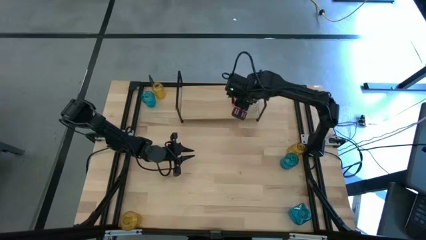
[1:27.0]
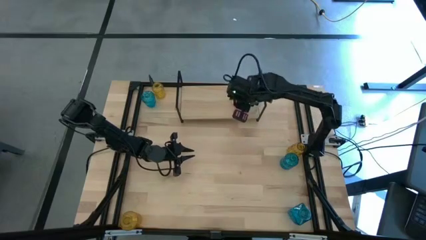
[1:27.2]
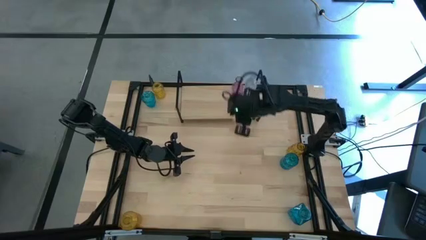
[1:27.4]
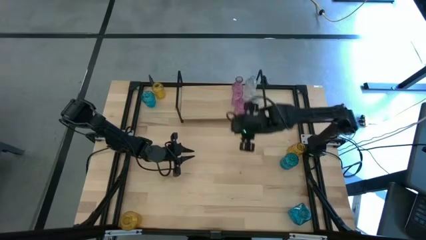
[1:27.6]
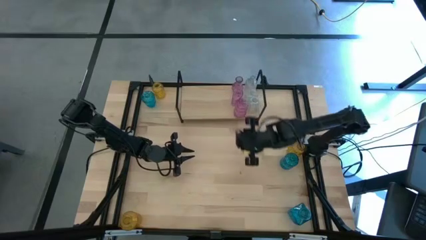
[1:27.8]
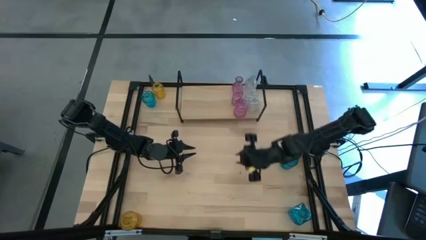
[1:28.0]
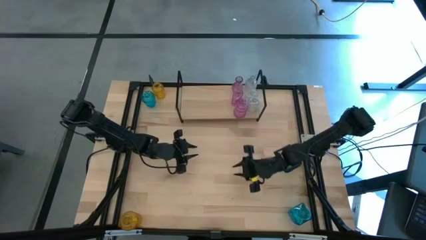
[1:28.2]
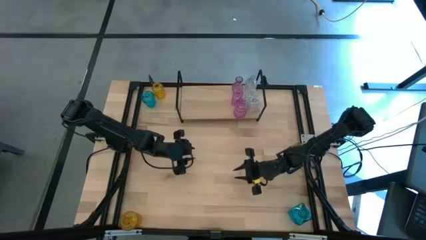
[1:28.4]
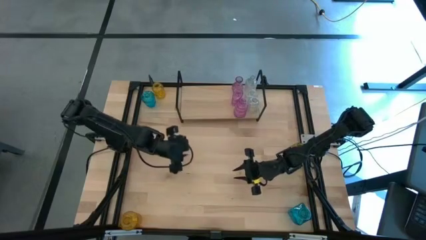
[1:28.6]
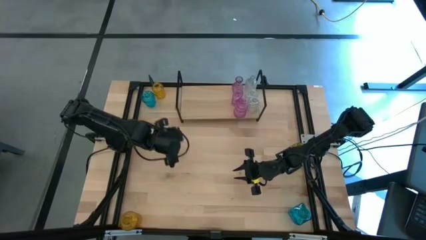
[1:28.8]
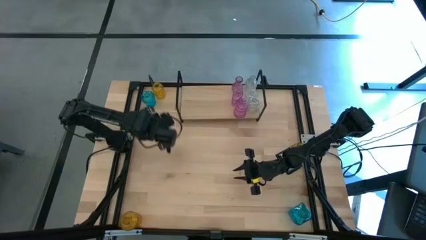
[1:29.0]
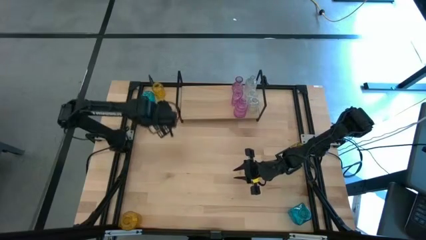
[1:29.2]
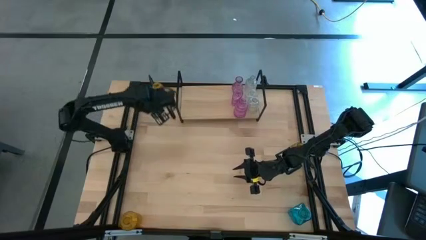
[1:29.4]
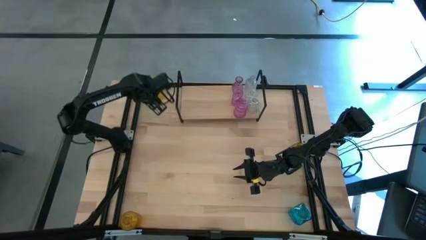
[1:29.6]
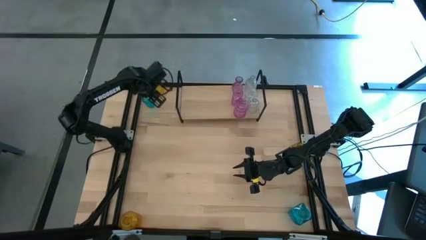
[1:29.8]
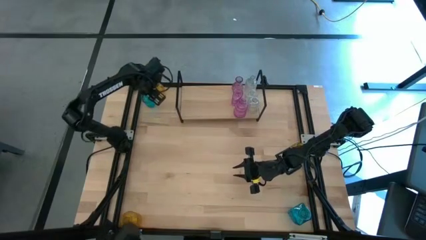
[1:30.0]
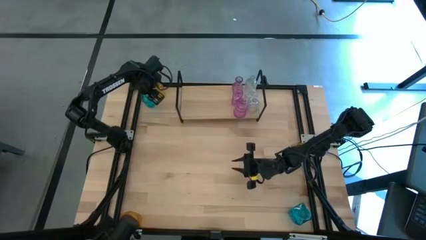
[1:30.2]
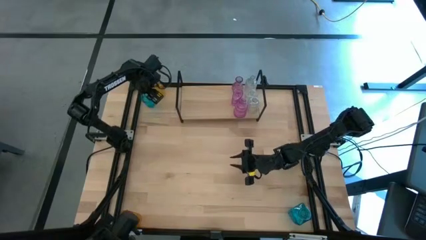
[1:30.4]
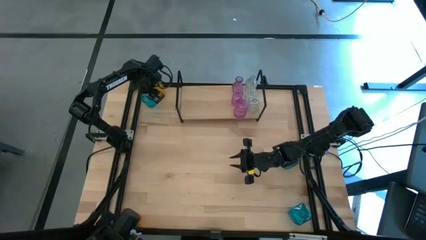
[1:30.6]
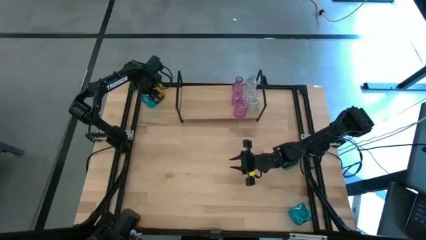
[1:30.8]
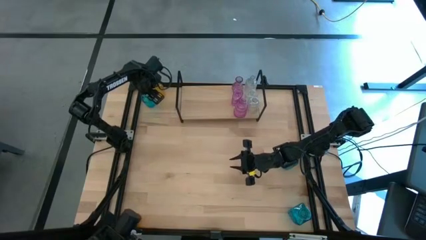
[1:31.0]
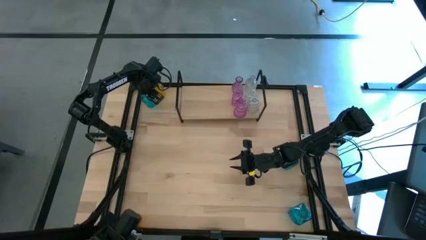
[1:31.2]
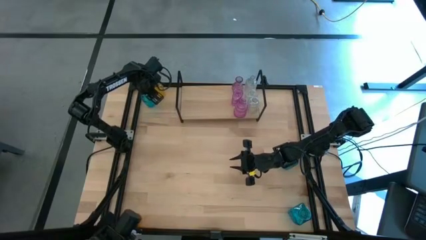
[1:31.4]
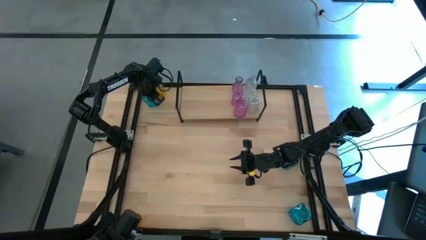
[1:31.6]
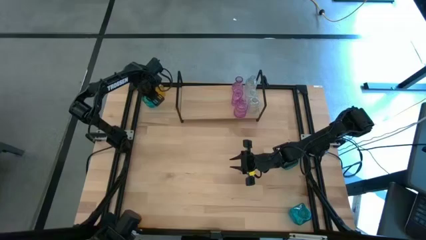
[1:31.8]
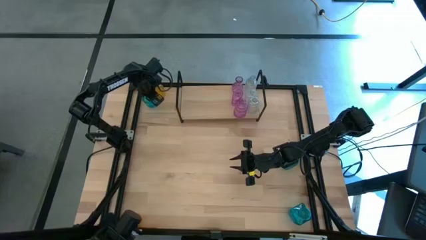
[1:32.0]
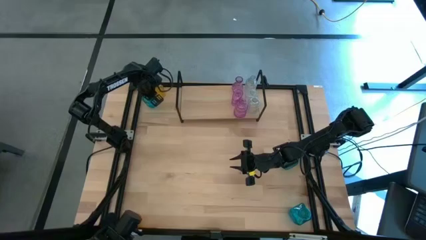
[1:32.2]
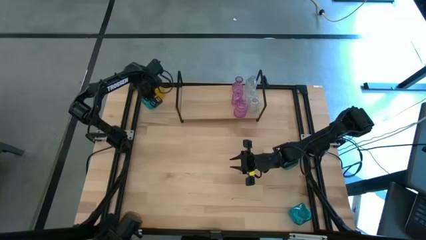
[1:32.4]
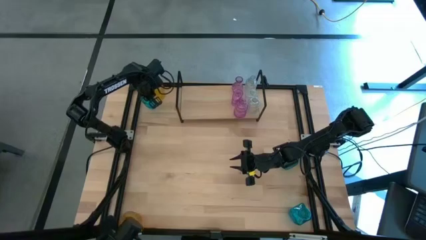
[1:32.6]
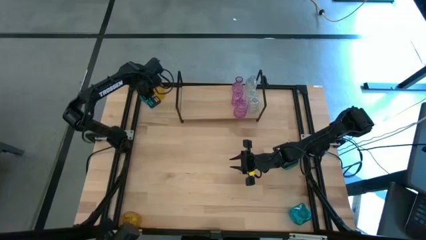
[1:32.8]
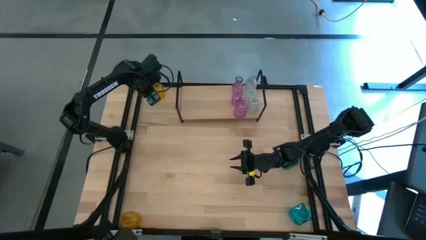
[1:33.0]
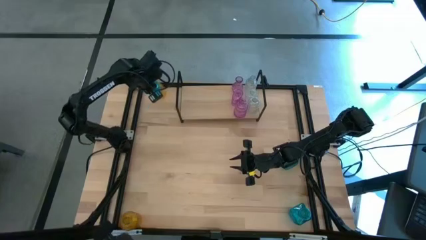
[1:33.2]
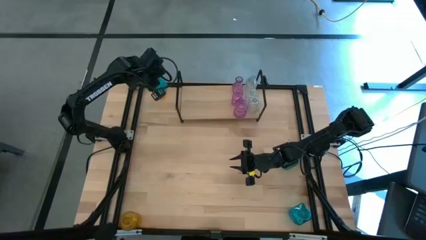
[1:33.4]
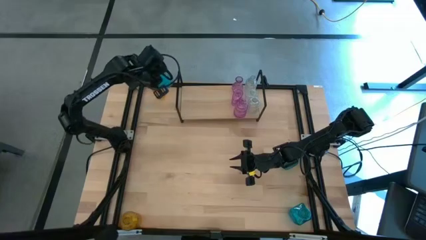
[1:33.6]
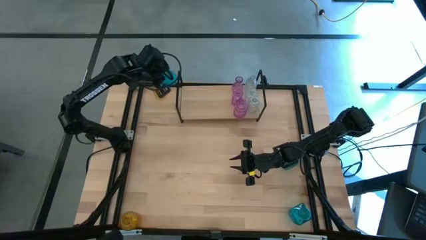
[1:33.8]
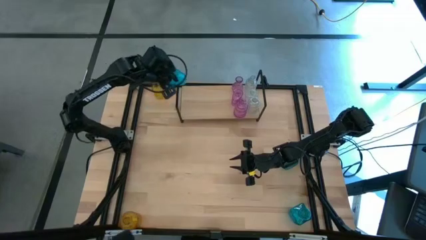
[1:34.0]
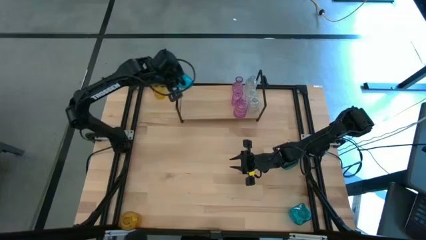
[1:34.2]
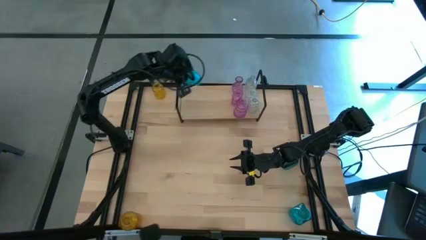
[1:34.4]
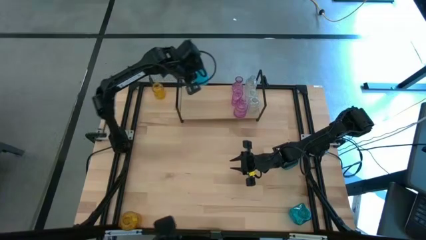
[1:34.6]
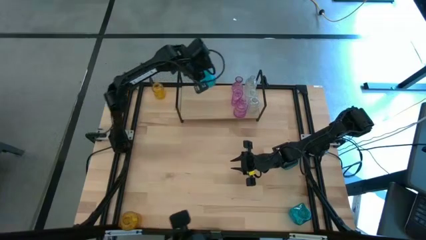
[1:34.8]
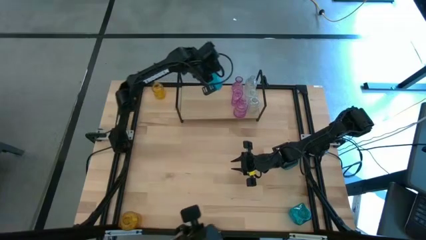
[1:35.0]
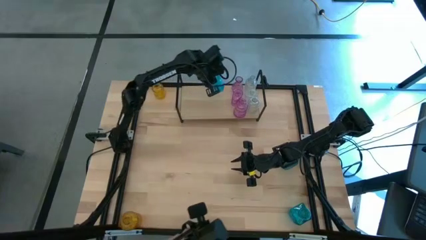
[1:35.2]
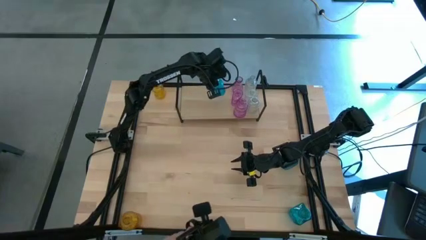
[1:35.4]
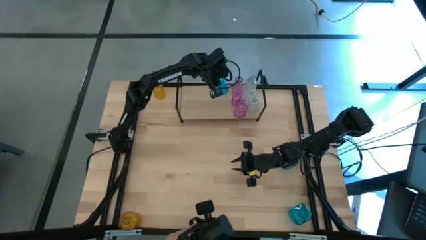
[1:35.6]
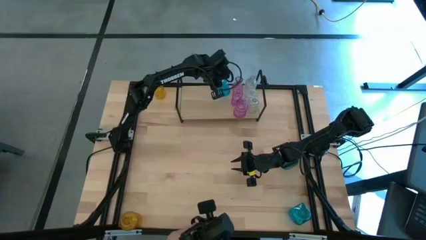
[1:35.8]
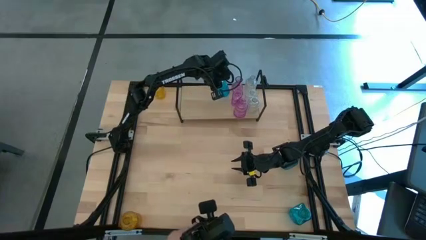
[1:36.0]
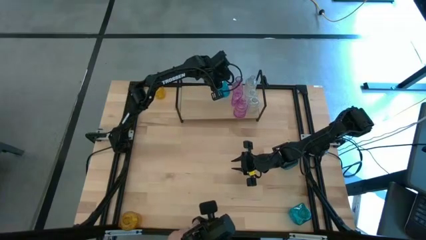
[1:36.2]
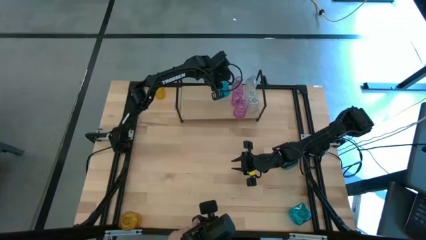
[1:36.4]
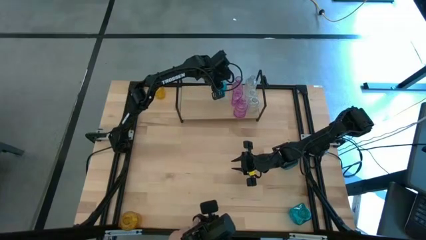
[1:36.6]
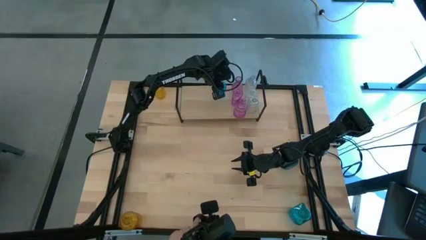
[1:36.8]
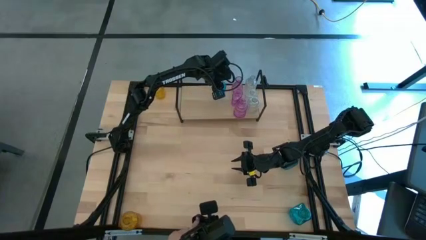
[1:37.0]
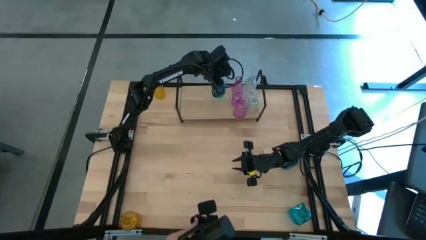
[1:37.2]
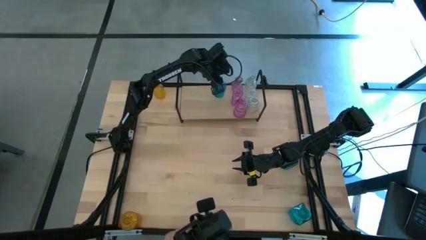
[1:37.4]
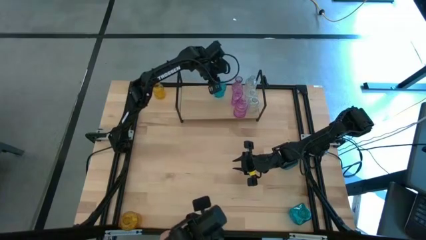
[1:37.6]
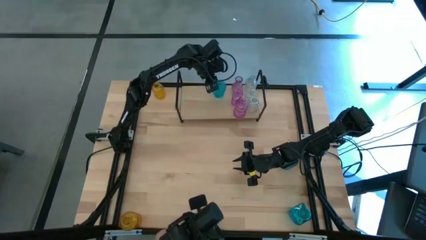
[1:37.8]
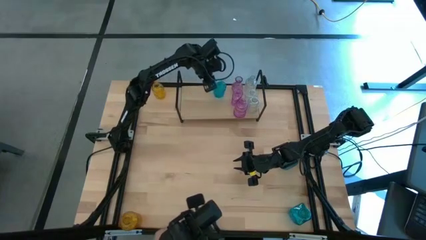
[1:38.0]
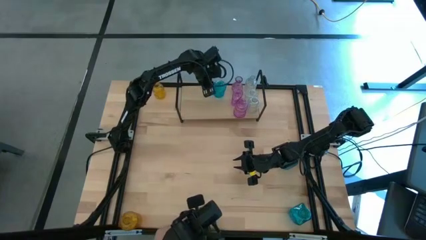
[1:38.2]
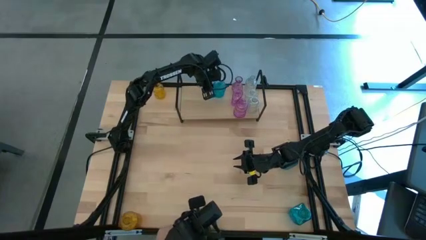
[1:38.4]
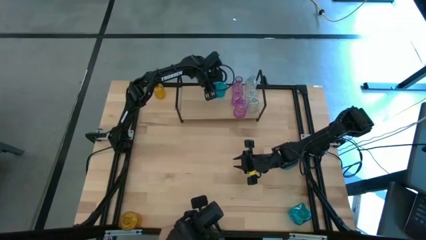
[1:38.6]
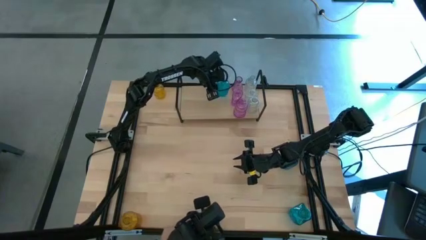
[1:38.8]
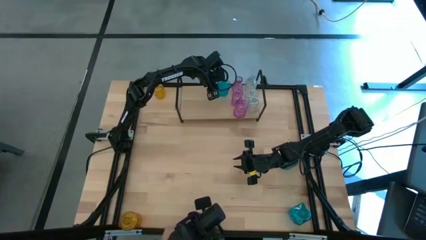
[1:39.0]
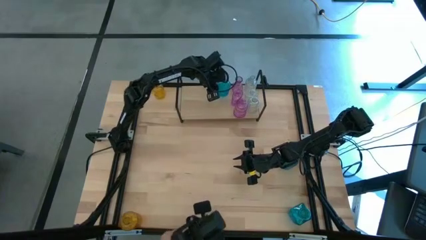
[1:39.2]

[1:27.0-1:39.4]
Task: sort vases onto shelf
Put the top left blue vase to the left side of the top violet vase on the shelf

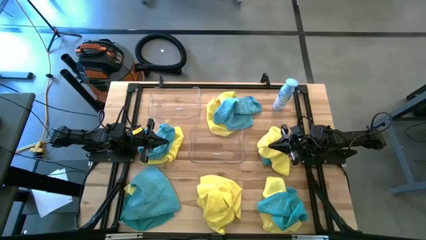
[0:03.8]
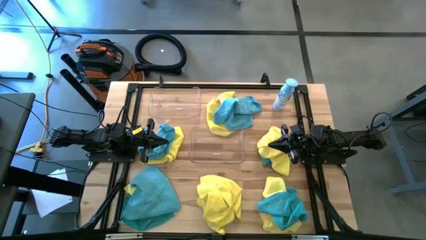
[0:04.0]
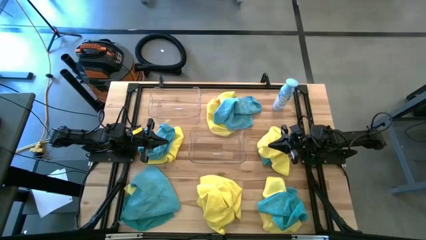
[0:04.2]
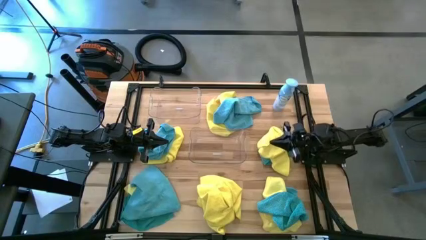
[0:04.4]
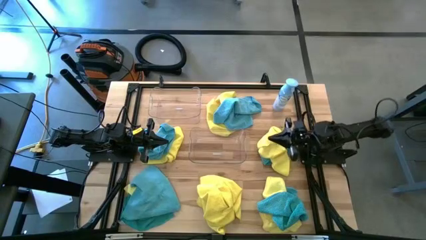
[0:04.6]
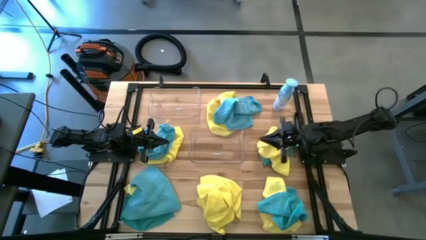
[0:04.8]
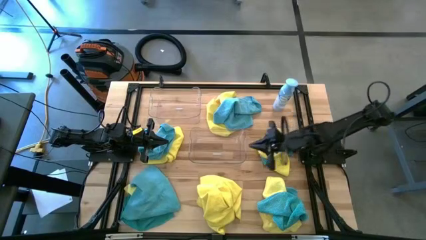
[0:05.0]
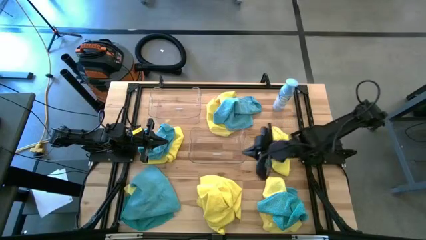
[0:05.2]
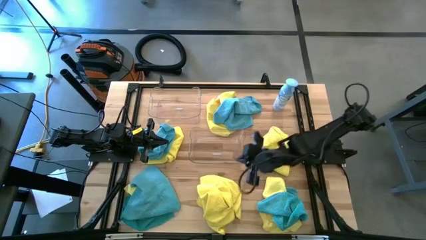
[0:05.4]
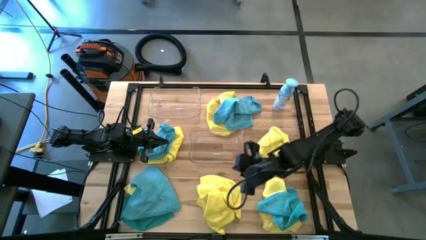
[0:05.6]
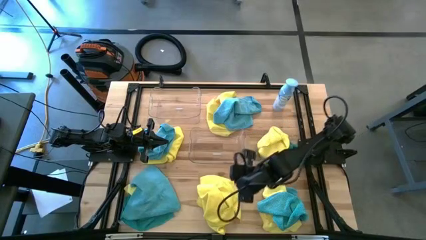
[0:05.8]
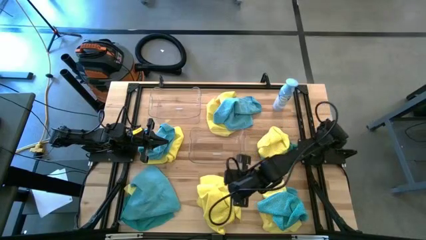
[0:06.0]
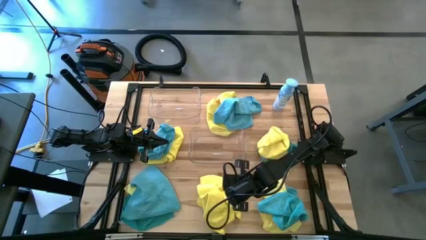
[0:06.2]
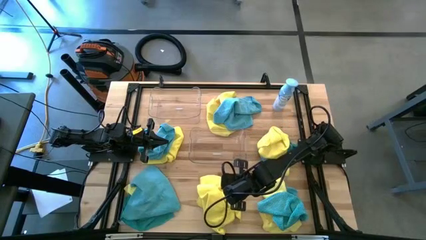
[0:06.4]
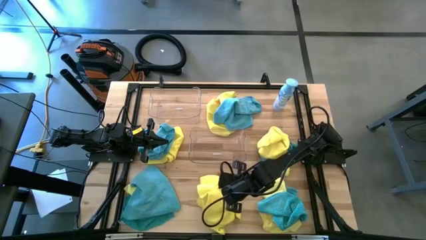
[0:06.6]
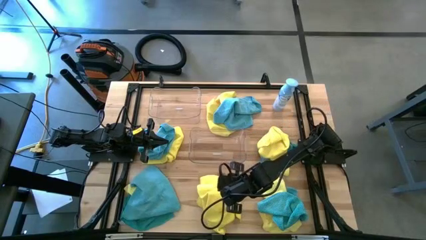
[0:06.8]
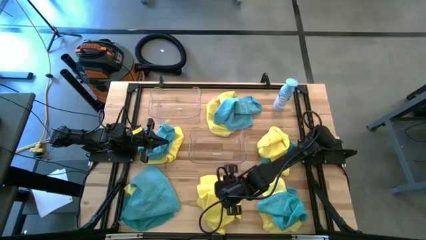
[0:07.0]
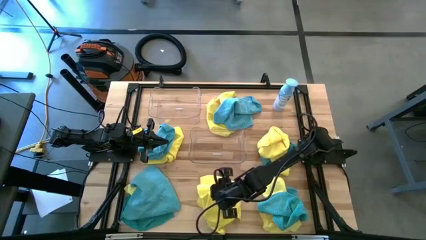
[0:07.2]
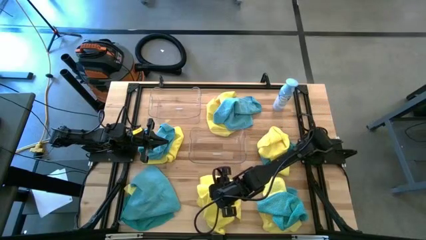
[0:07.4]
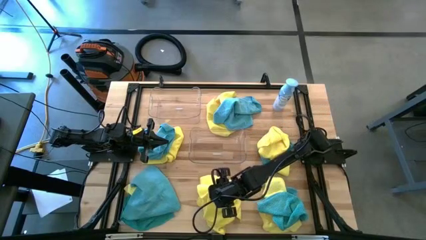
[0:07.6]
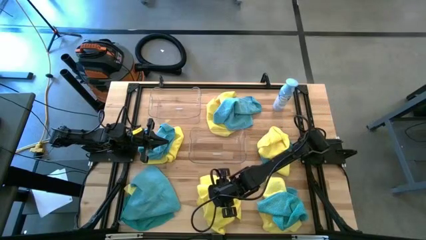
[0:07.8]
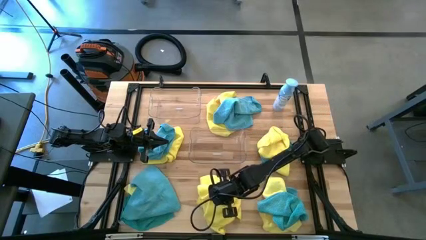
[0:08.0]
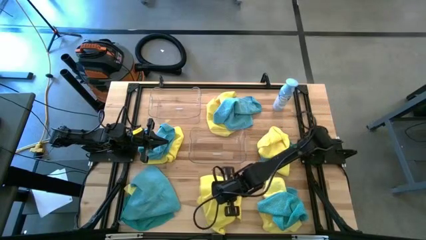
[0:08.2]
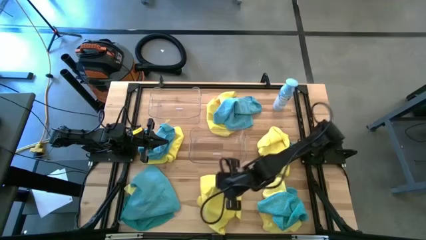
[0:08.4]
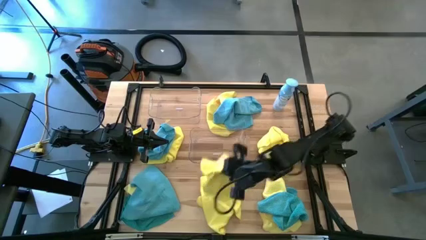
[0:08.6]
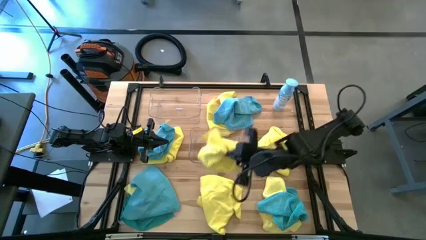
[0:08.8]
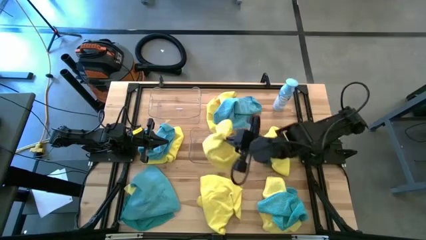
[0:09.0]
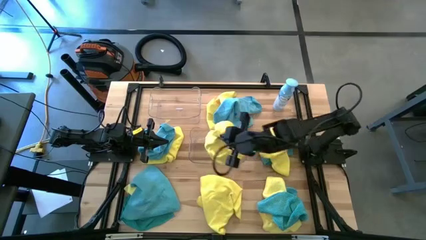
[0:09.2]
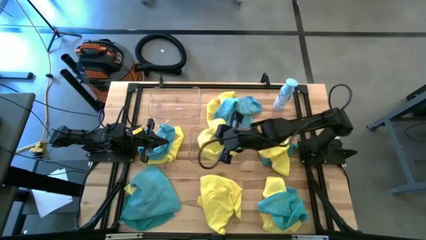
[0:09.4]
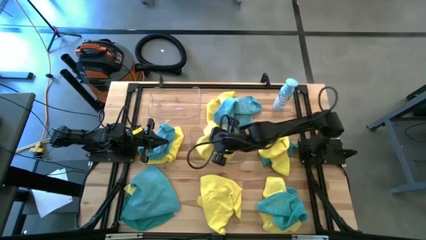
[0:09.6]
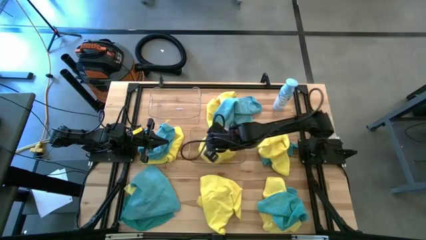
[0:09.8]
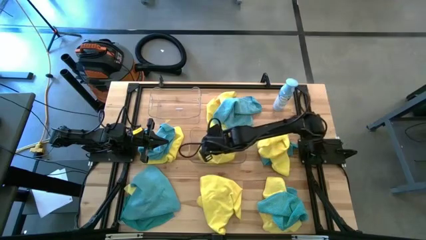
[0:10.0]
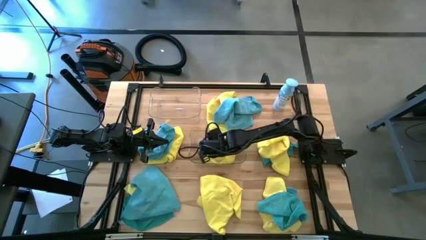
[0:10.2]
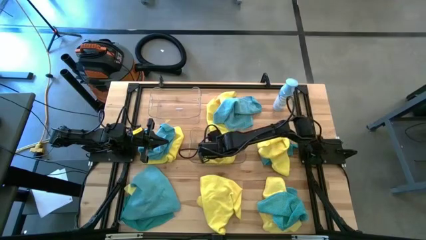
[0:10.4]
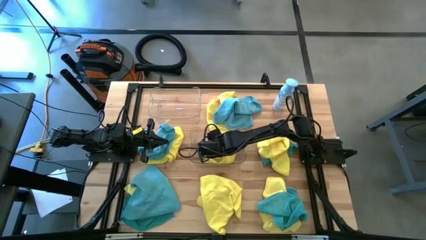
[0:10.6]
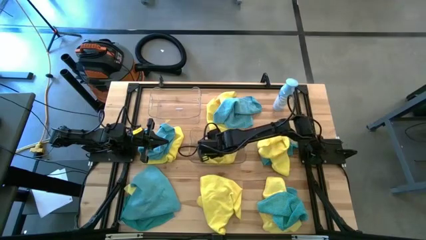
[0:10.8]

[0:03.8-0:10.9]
Task: Sort microfiber towel by color & place in baskets
Put the yellow towel into the bottom transparent bin
